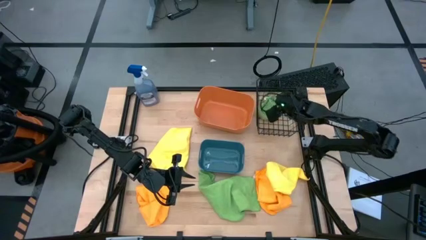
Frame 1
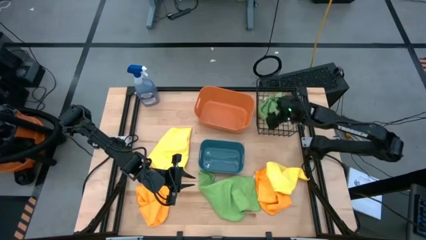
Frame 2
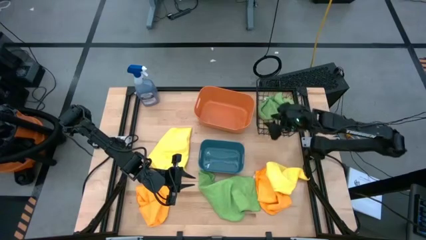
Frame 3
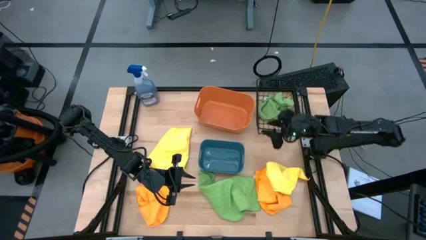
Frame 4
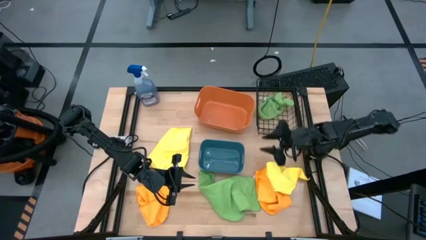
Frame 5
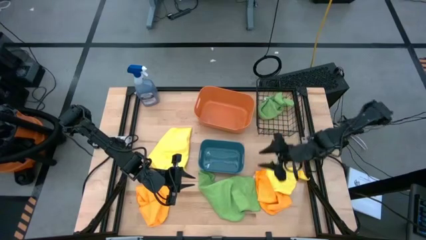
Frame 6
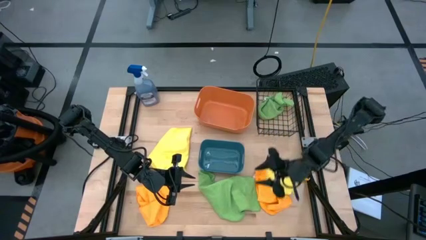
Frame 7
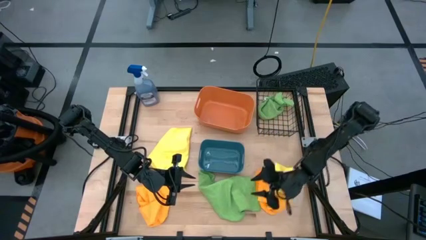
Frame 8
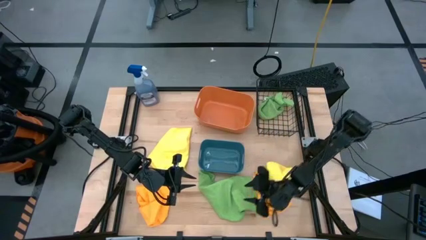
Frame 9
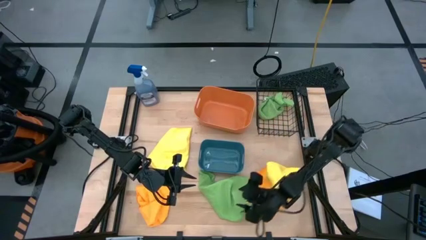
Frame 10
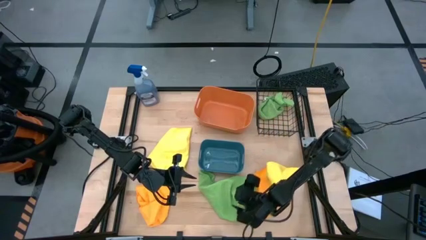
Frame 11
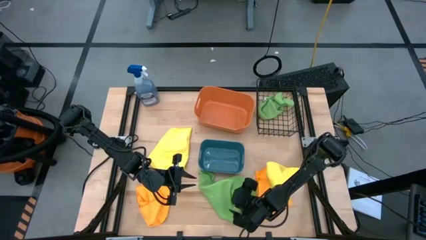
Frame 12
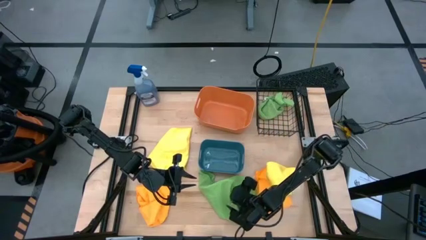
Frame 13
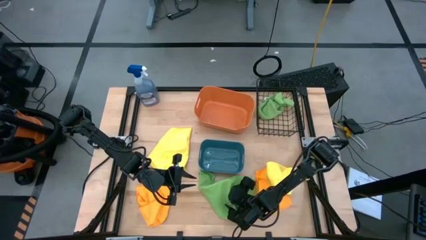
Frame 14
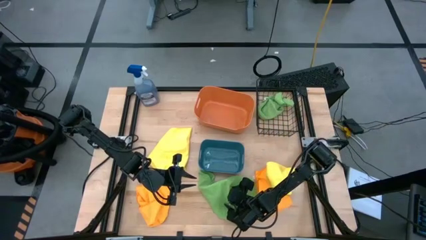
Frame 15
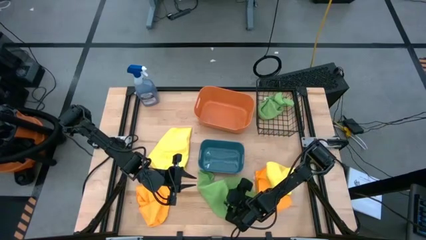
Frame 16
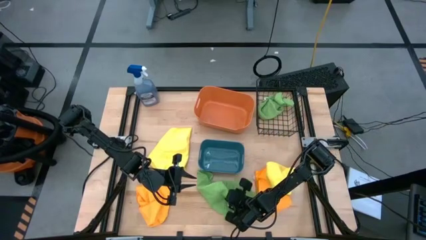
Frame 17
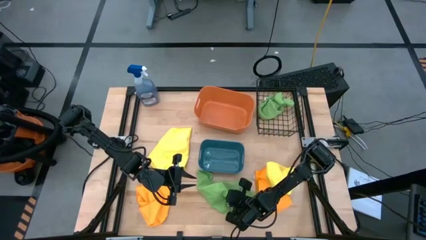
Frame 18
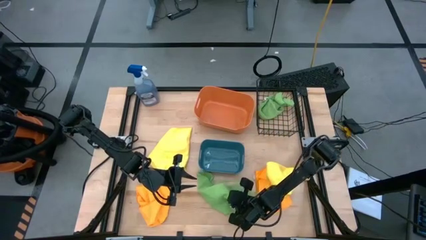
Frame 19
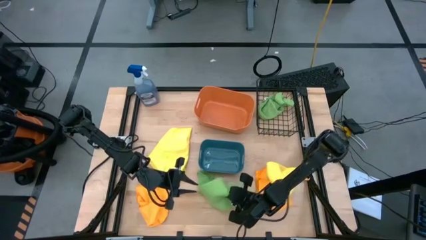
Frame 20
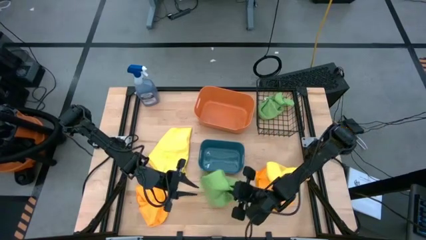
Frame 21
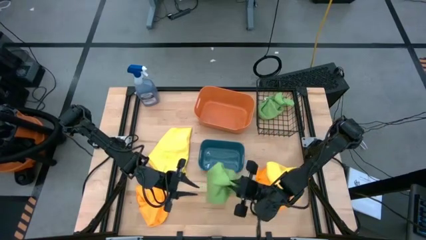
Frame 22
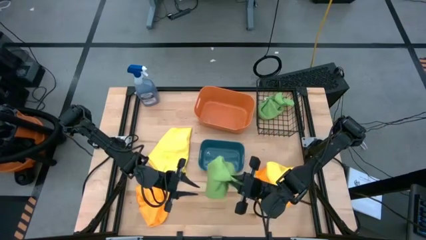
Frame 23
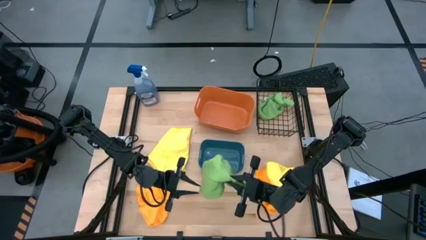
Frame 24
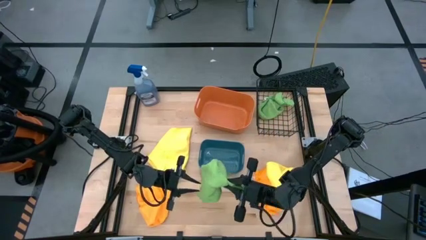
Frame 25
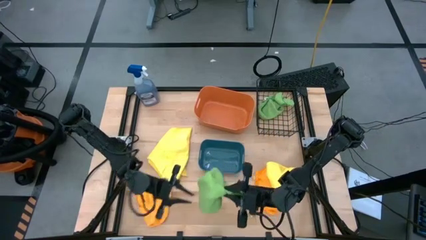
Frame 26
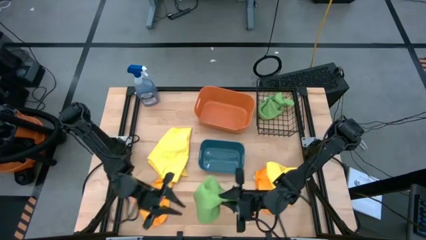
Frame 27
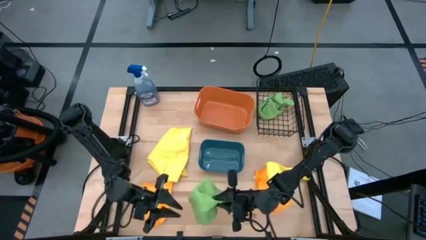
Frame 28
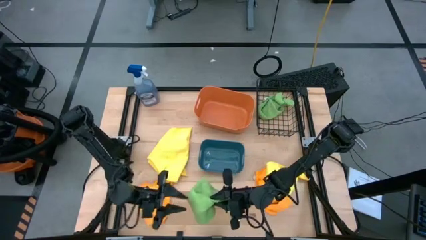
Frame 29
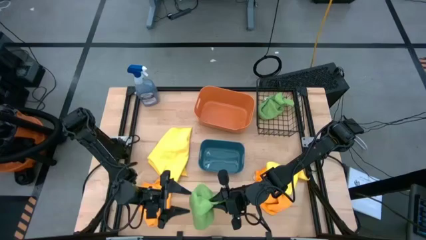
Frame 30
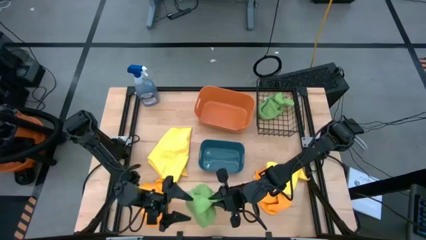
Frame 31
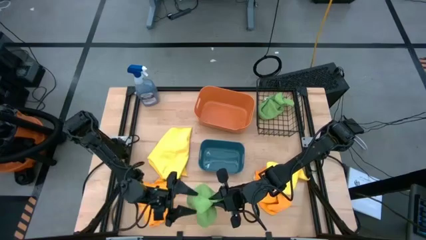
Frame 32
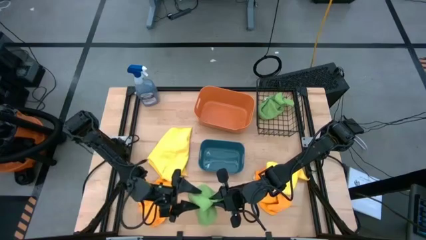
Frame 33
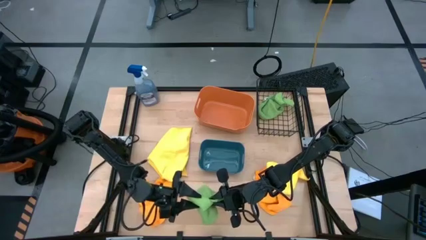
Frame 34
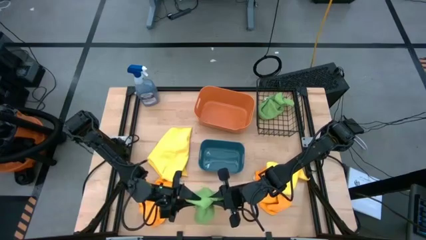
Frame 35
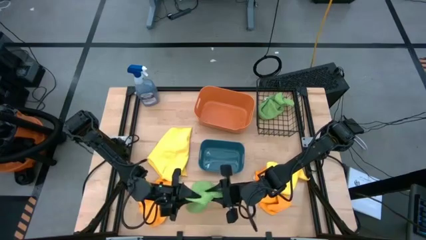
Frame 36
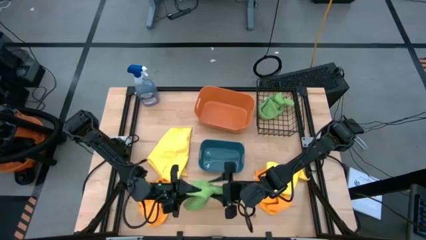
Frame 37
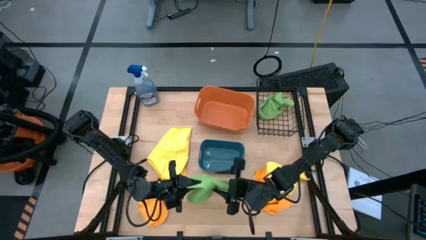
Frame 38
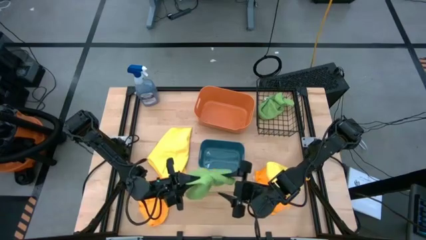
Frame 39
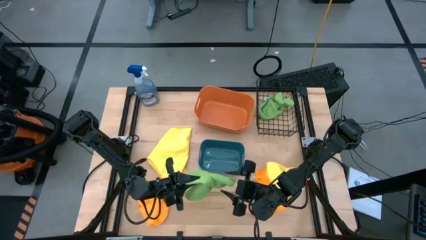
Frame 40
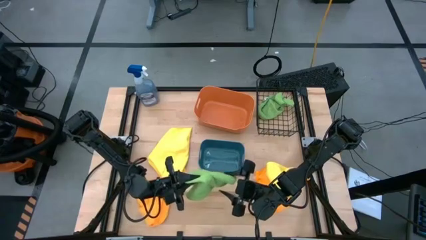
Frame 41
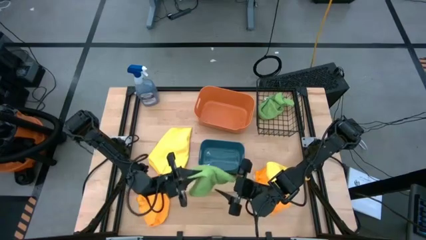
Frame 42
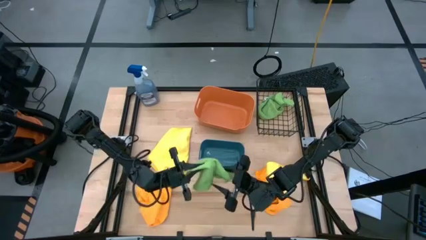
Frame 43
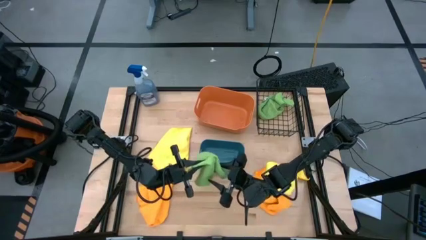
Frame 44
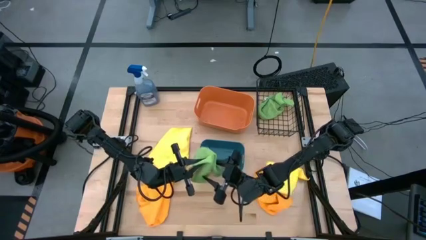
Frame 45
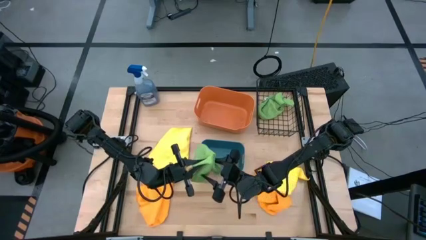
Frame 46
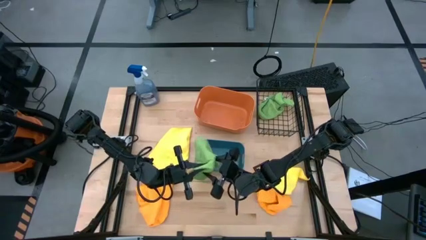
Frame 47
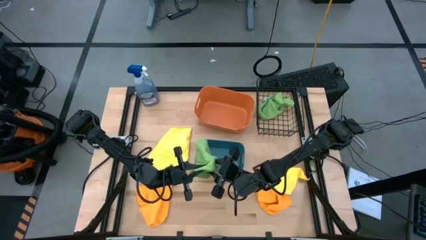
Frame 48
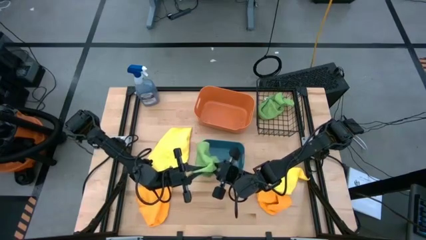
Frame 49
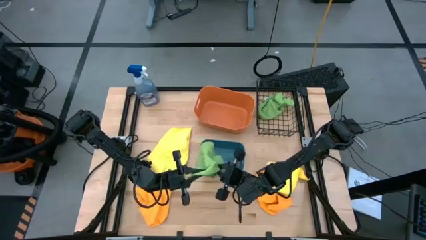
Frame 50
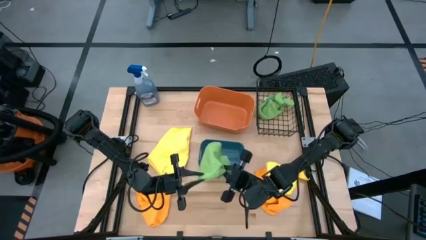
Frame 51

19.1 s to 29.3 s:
Task: Sort microfiber towel by color & place in baskets
Put the green microfiber towel into the wire basket
